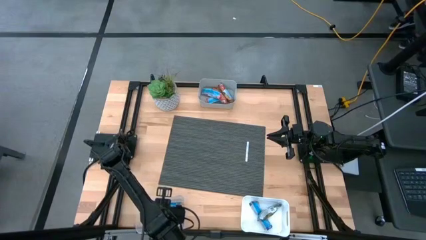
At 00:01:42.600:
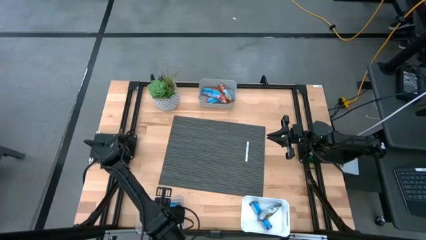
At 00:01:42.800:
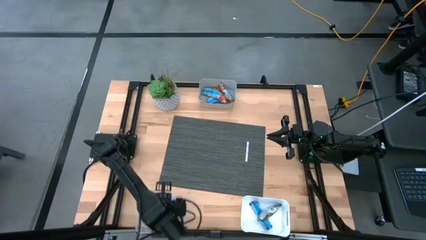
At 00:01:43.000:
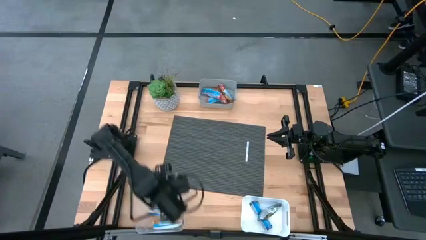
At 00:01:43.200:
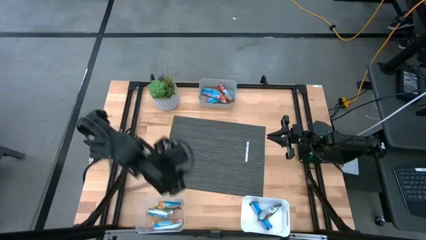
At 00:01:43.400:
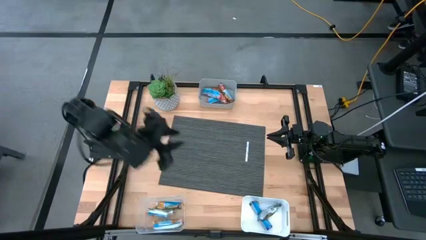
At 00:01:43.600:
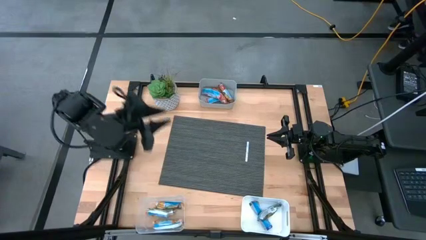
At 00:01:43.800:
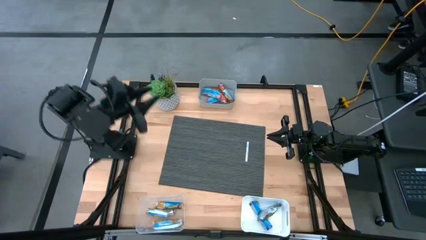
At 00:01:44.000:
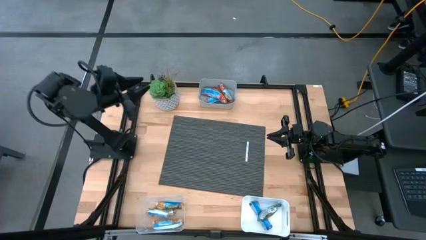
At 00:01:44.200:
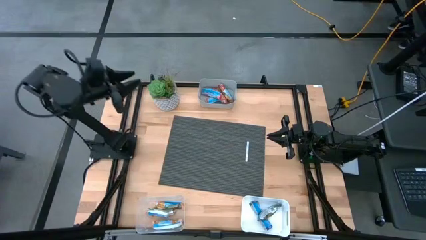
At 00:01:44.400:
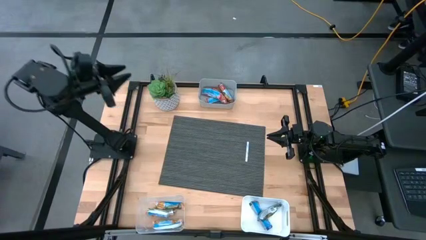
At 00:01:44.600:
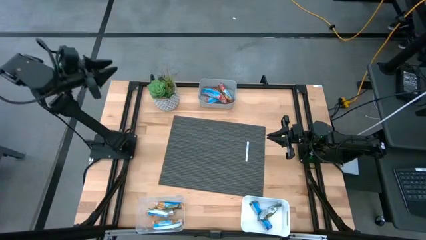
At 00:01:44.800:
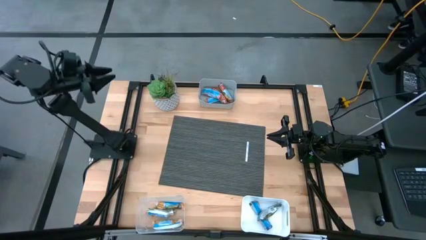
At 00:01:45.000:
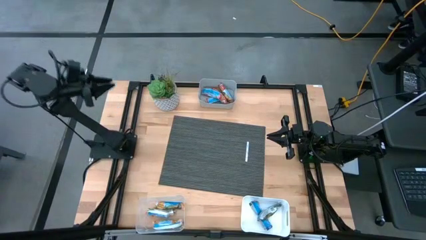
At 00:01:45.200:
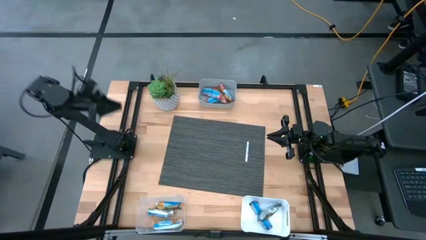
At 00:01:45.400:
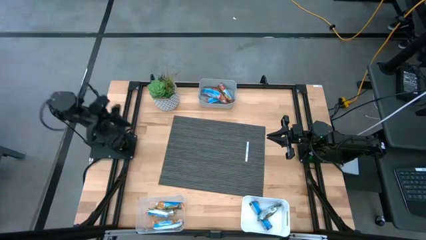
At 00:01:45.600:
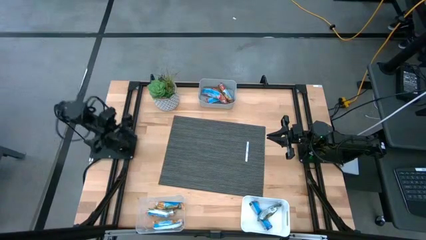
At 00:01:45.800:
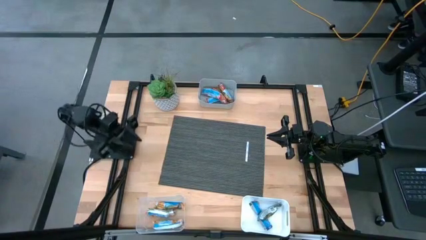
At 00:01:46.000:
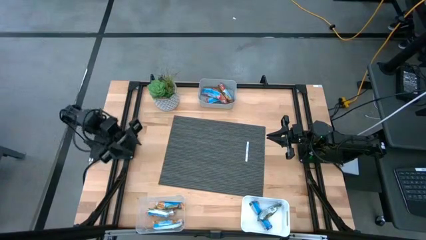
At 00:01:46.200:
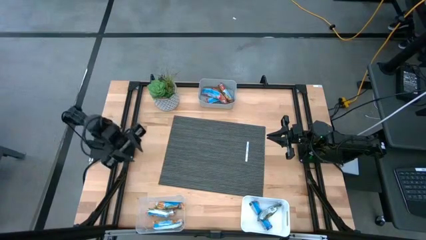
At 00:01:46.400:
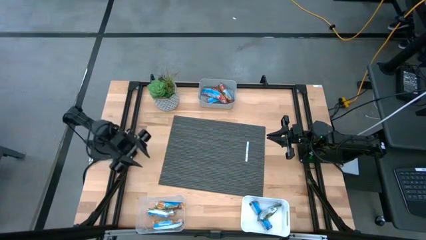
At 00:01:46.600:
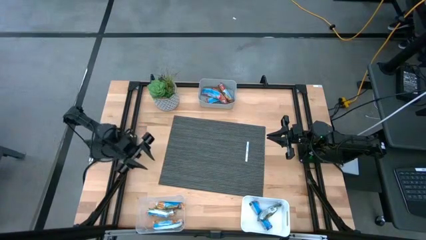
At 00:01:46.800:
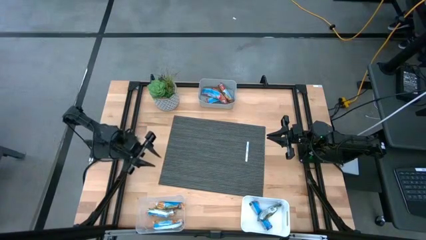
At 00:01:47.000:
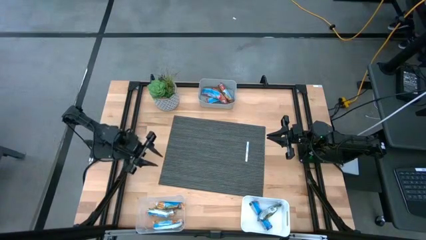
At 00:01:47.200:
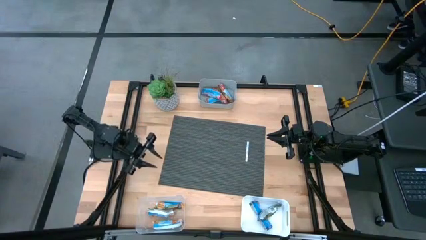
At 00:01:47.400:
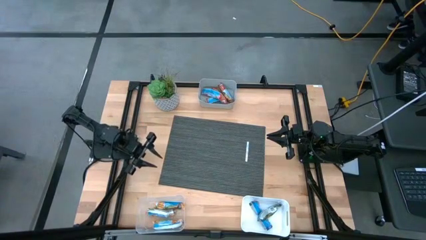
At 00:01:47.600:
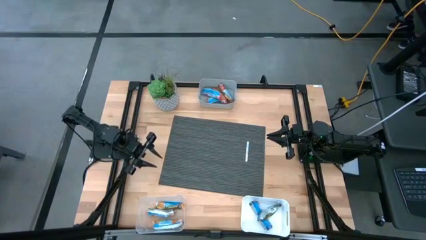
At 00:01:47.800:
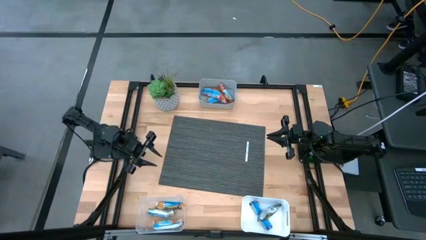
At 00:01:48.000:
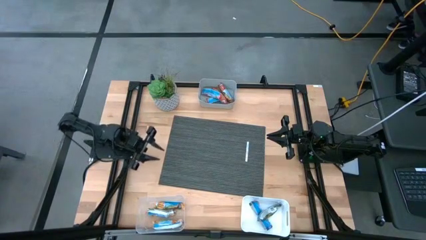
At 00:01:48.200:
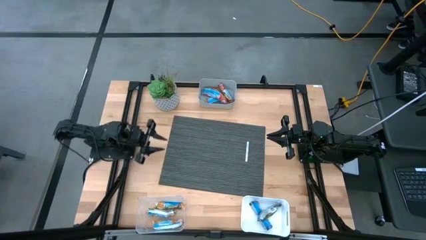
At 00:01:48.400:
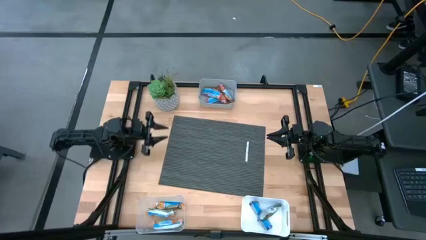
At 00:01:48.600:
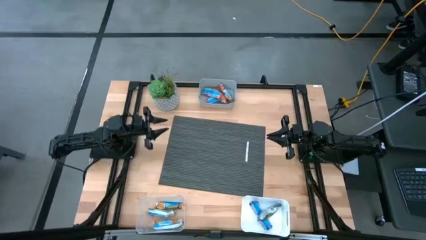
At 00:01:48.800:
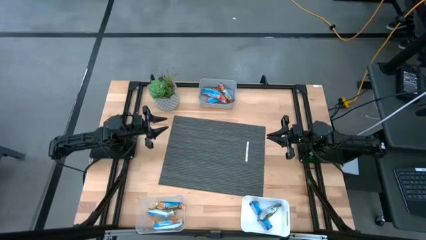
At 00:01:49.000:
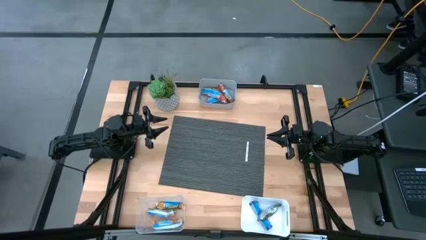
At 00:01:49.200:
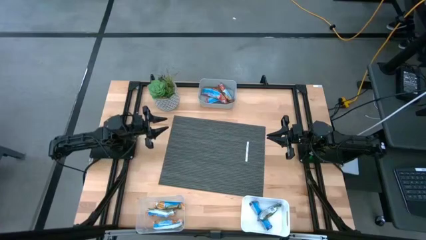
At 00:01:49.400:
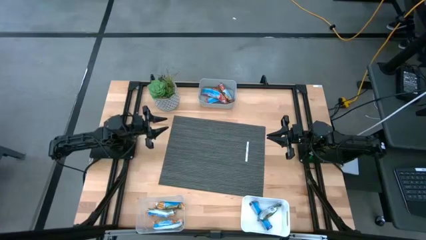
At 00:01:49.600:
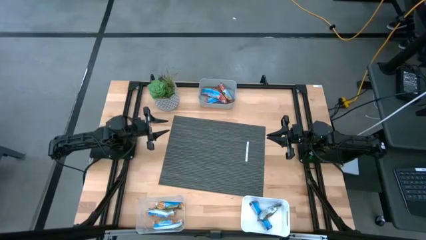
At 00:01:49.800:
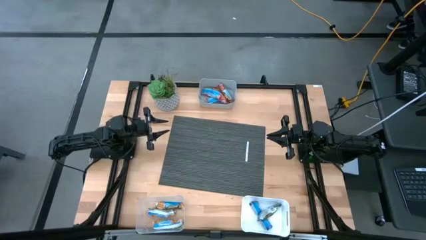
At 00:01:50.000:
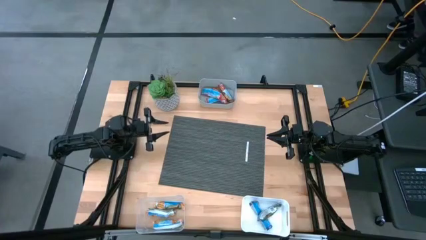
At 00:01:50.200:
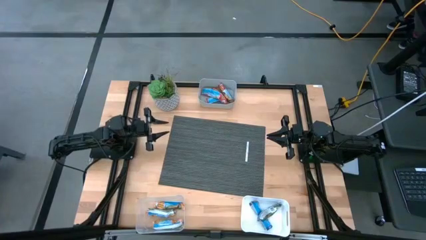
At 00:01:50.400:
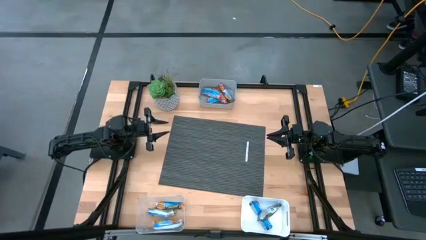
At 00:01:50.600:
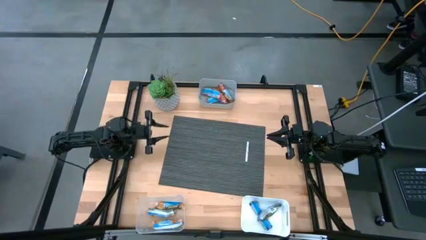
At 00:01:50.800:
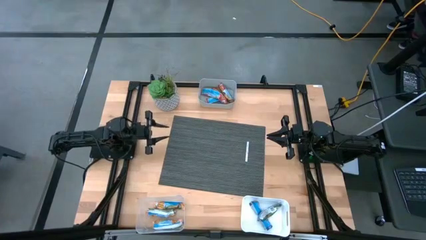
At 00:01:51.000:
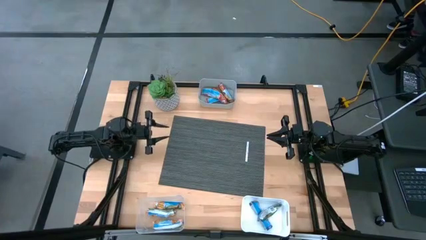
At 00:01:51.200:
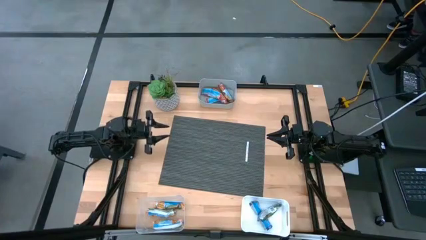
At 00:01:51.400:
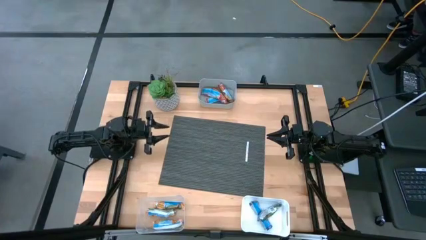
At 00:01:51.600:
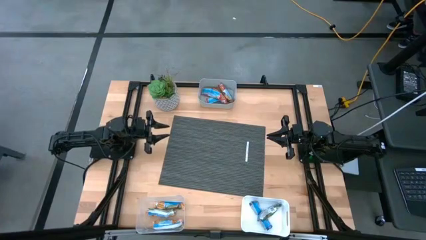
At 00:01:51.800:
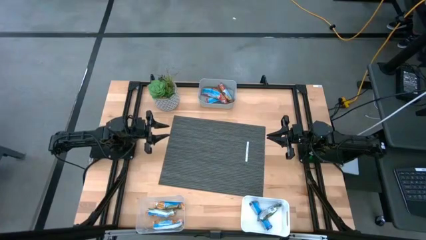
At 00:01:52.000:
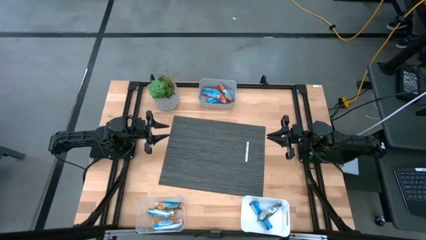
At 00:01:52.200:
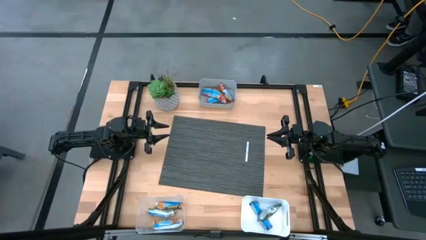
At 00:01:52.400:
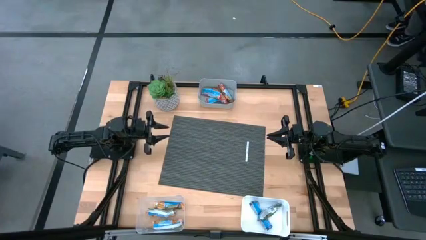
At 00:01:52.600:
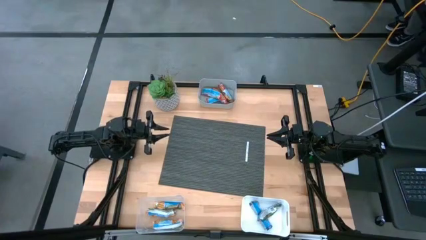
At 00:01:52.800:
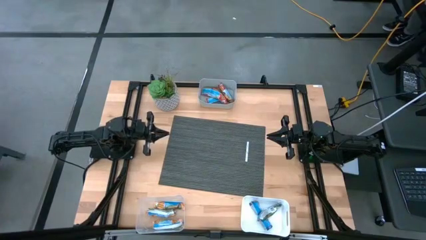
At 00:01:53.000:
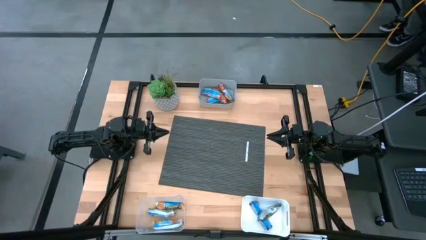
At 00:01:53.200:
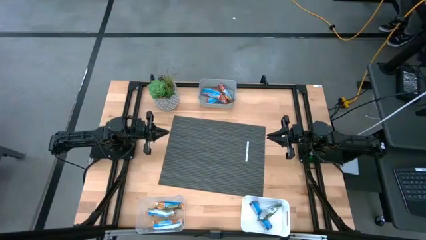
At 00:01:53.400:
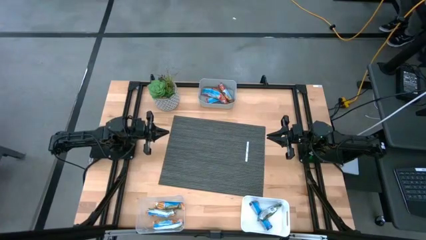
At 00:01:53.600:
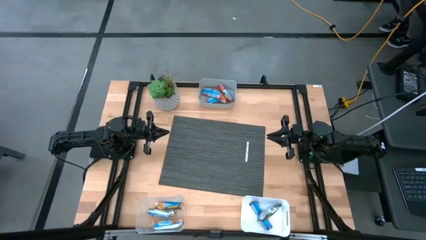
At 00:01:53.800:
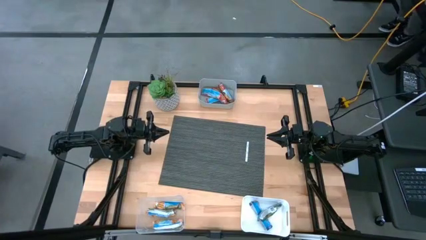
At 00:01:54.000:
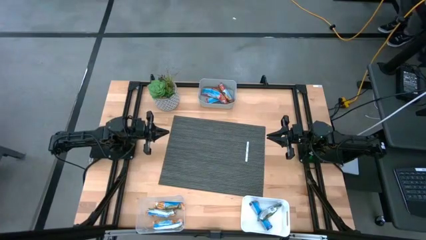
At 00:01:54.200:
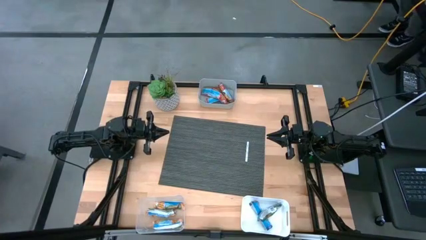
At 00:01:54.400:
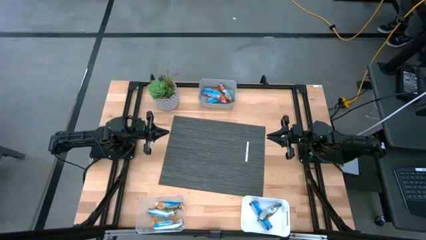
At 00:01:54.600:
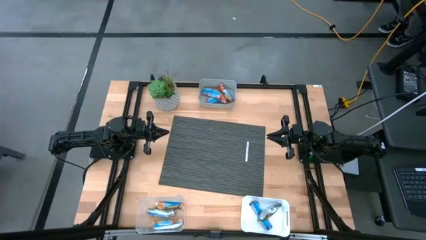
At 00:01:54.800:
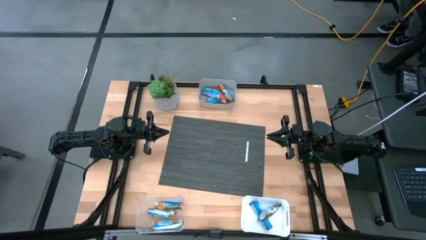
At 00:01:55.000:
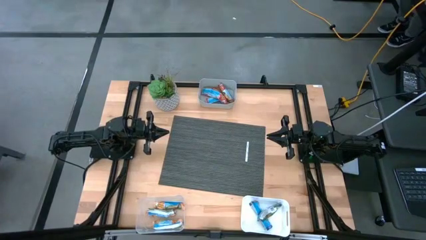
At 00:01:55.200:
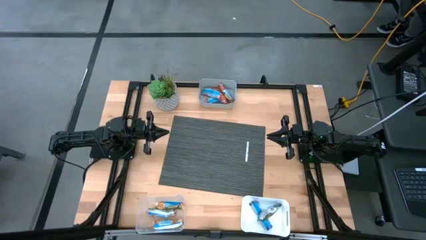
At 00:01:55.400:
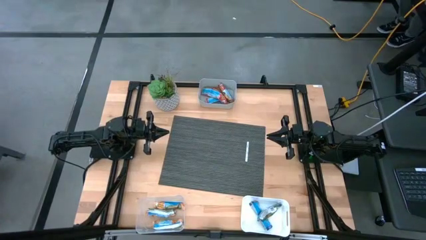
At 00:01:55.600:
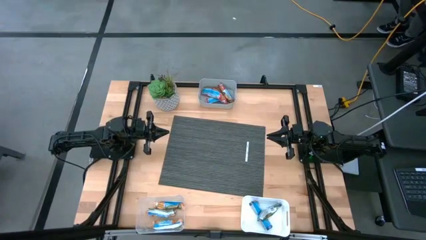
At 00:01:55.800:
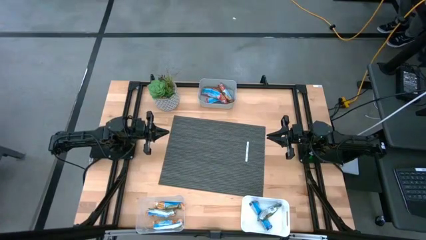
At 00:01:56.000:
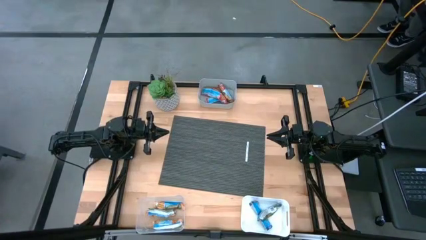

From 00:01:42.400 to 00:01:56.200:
Task: Pick and place Granola Bars by type
Return to Home Position

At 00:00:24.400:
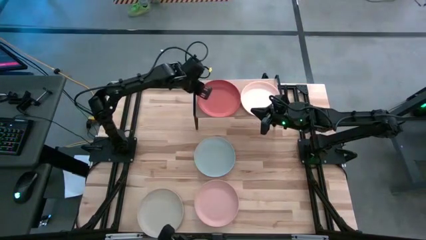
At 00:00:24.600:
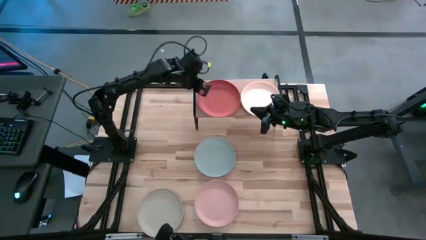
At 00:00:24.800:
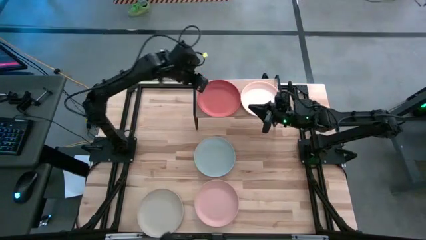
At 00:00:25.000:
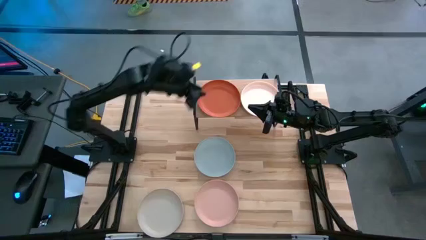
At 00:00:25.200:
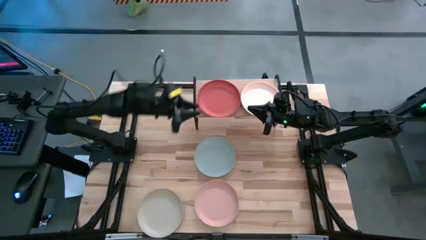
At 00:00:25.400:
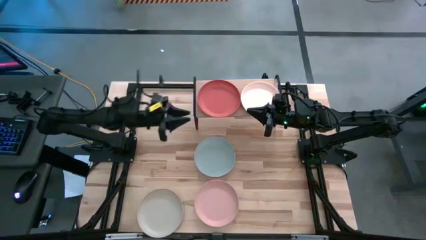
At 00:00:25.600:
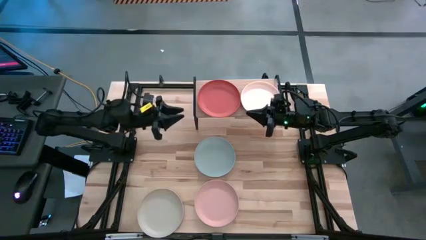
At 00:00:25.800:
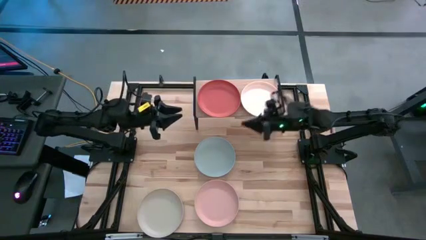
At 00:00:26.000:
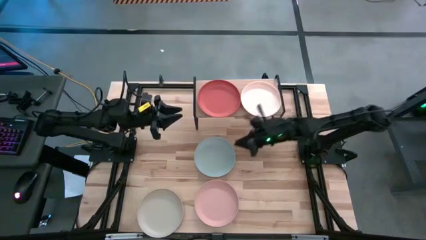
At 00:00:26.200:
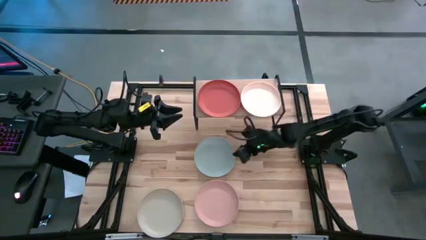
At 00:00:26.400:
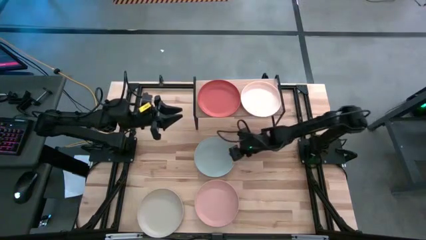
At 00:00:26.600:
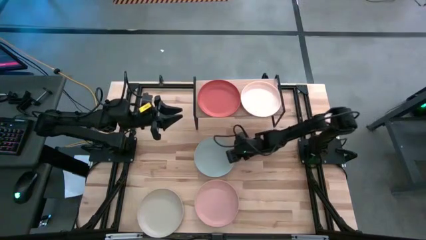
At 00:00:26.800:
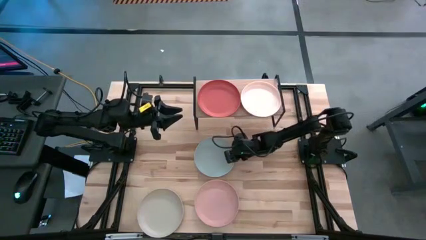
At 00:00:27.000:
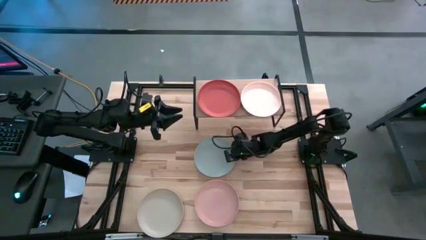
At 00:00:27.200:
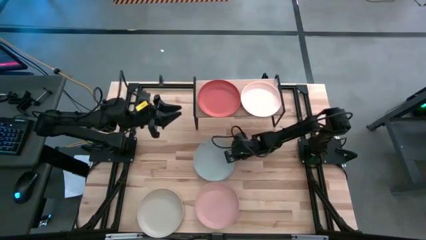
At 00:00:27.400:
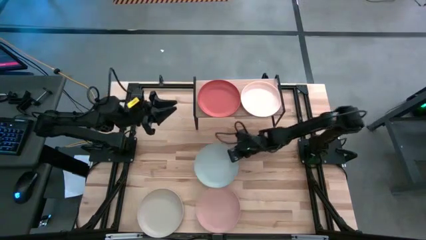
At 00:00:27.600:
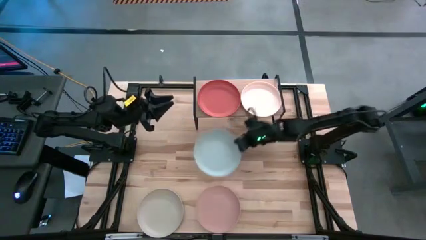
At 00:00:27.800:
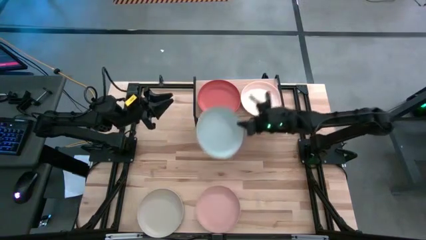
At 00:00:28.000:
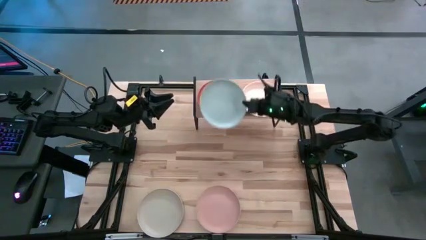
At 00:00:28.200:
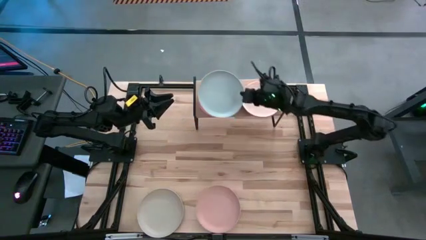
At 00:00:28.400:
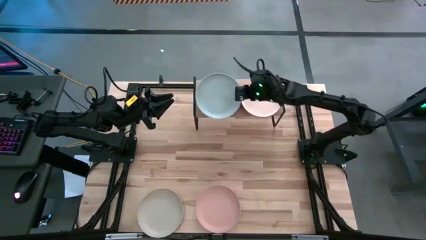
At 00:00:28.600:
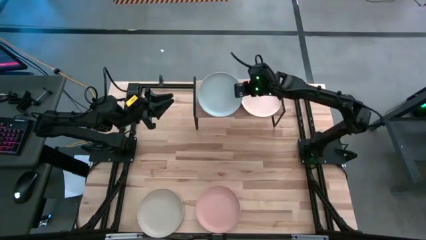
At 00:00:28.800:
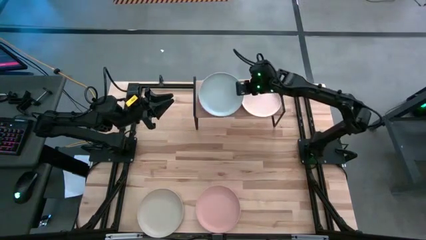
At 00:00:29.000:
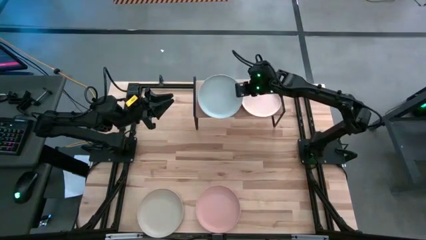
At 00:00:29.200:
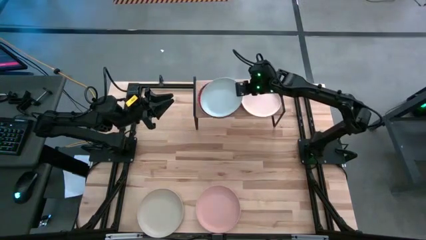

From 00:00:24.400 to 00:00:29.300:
Task: Place and stack plates onto a shelf
Stack the blue plate into the orange plate
